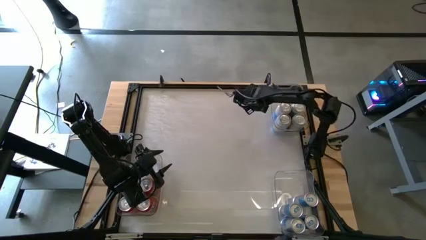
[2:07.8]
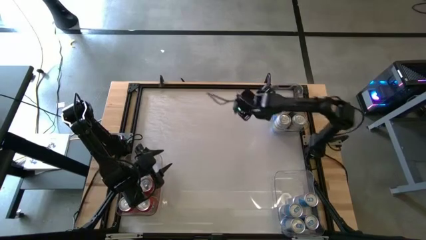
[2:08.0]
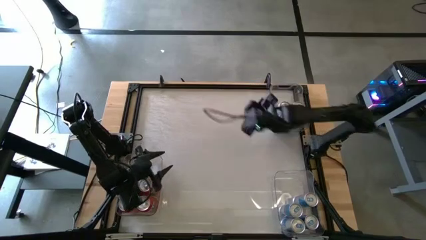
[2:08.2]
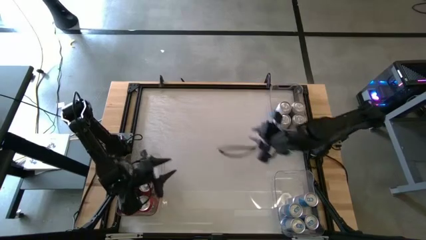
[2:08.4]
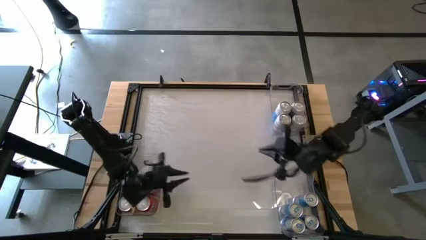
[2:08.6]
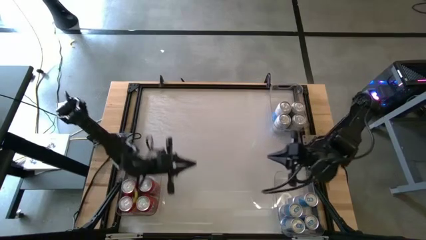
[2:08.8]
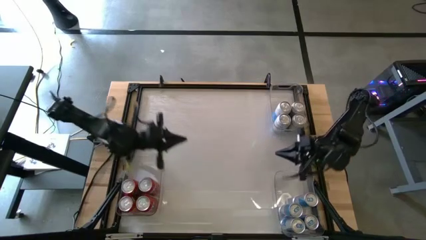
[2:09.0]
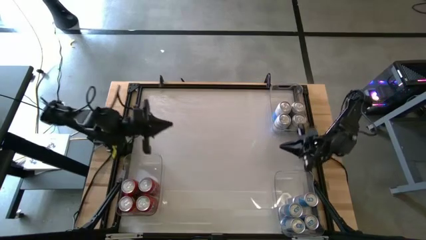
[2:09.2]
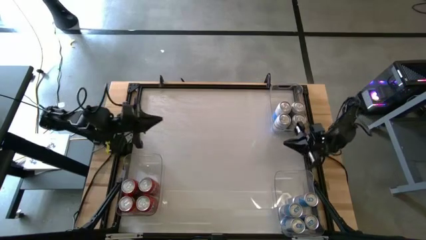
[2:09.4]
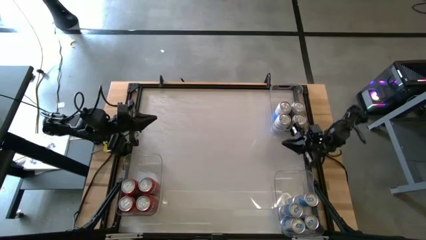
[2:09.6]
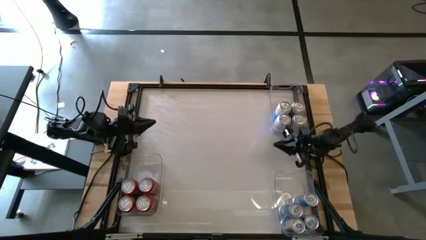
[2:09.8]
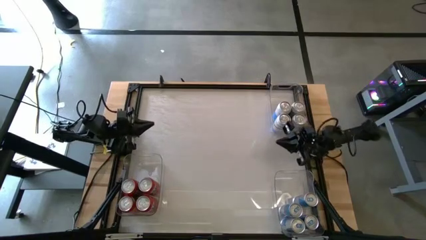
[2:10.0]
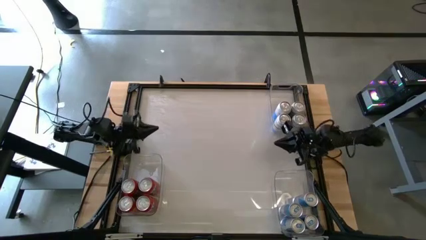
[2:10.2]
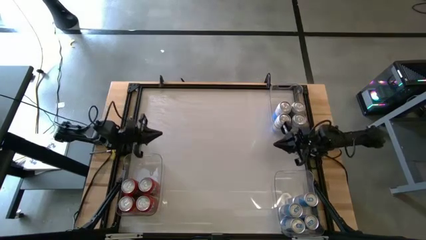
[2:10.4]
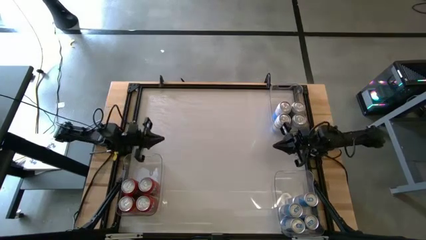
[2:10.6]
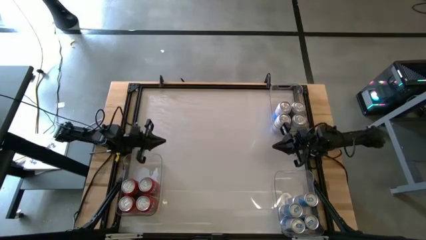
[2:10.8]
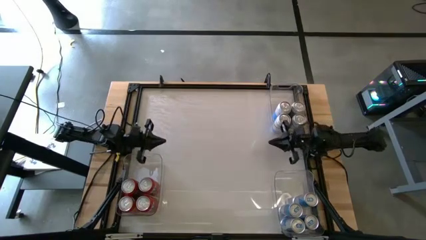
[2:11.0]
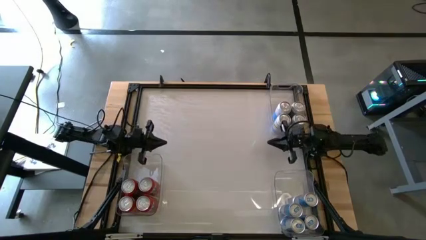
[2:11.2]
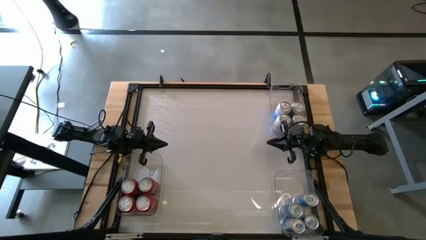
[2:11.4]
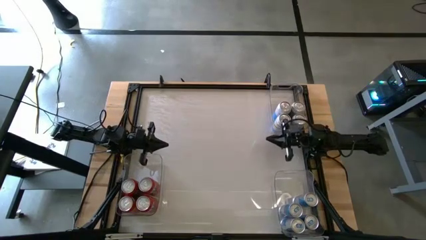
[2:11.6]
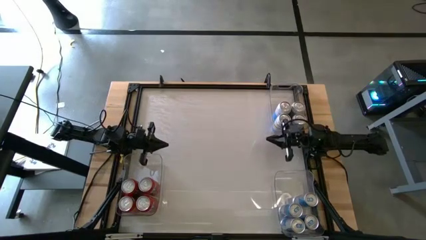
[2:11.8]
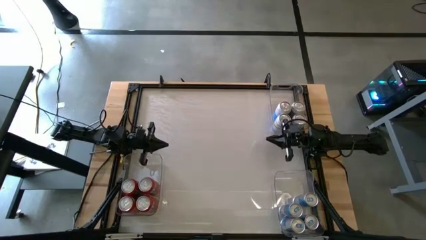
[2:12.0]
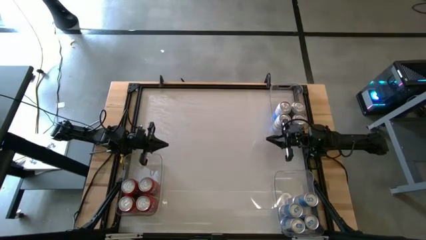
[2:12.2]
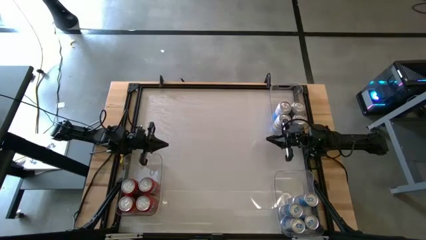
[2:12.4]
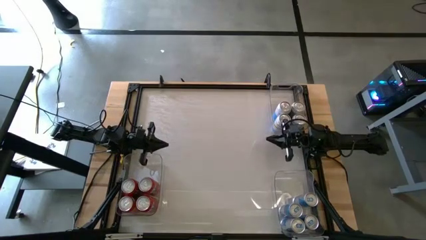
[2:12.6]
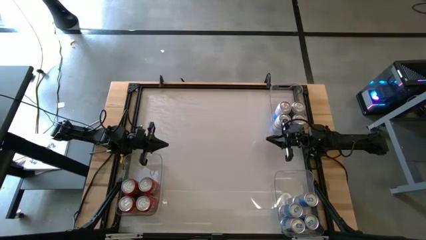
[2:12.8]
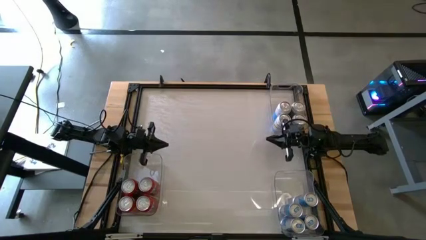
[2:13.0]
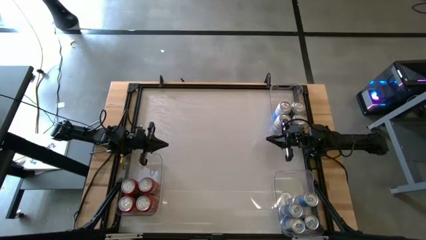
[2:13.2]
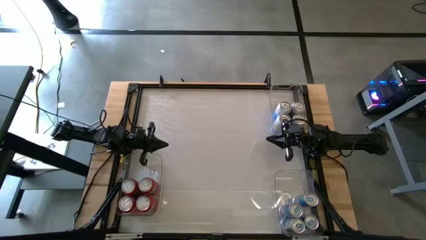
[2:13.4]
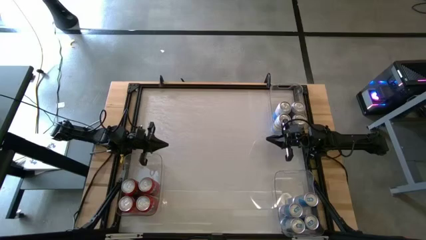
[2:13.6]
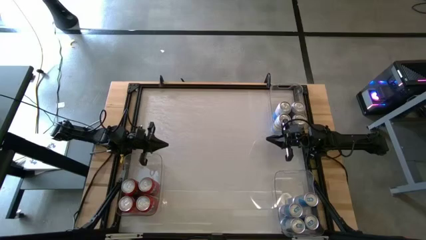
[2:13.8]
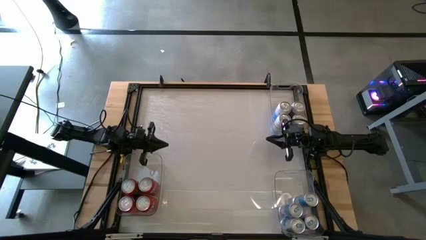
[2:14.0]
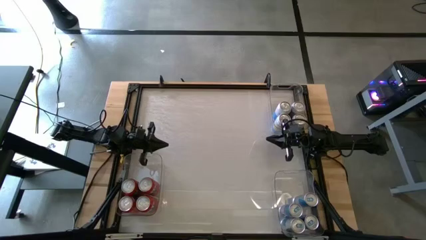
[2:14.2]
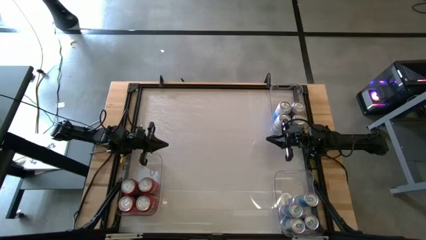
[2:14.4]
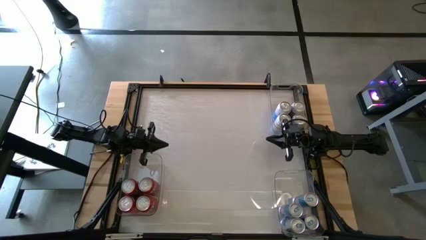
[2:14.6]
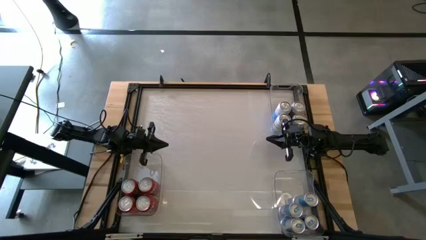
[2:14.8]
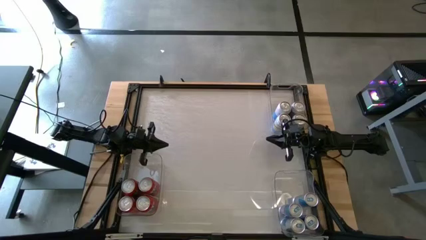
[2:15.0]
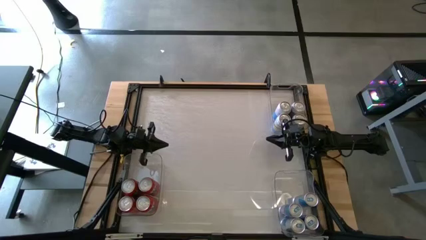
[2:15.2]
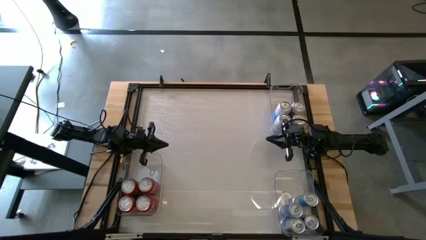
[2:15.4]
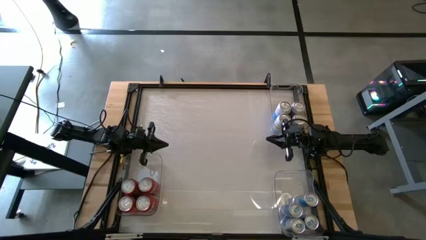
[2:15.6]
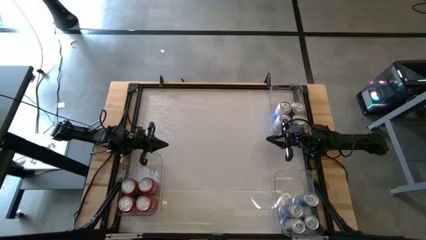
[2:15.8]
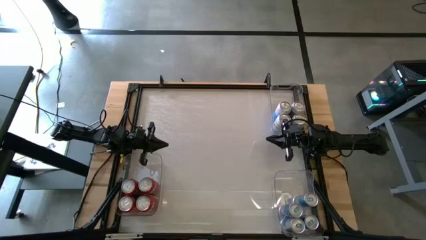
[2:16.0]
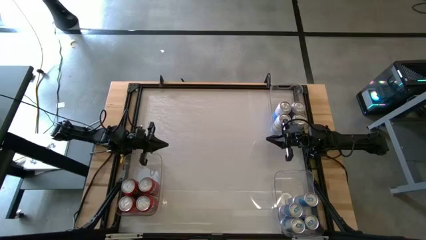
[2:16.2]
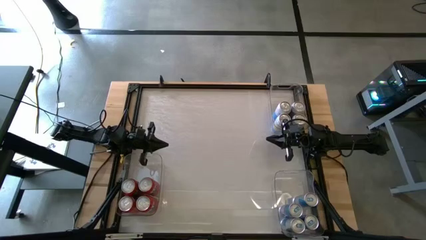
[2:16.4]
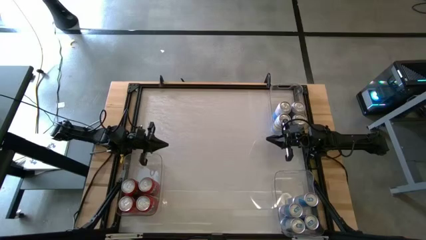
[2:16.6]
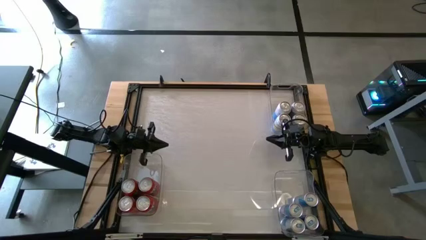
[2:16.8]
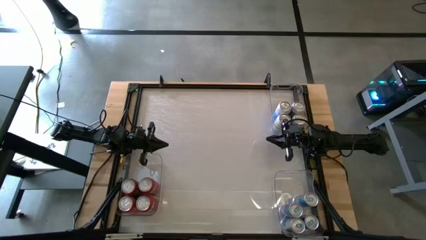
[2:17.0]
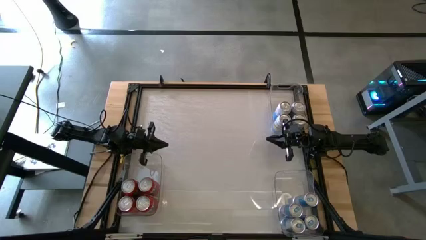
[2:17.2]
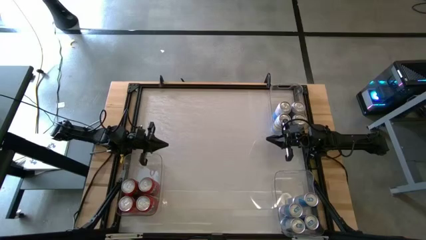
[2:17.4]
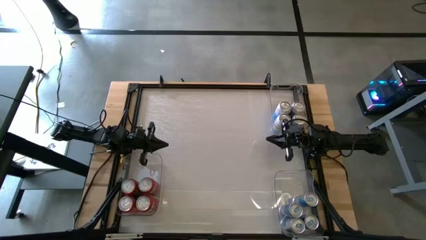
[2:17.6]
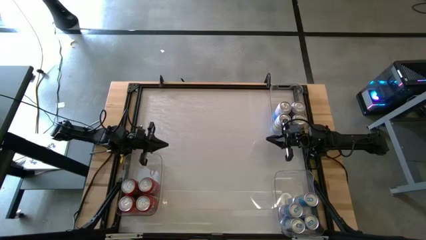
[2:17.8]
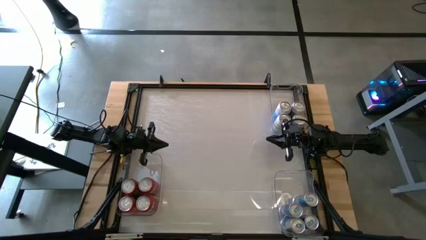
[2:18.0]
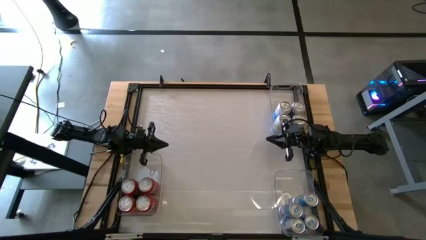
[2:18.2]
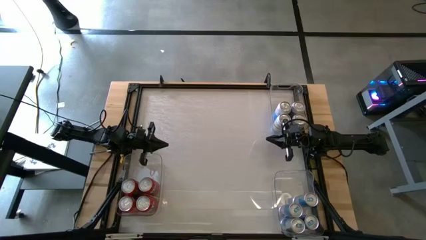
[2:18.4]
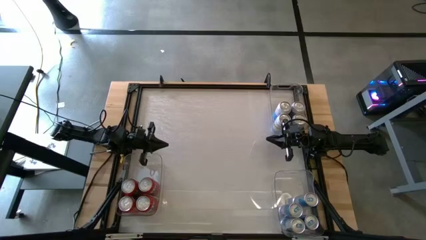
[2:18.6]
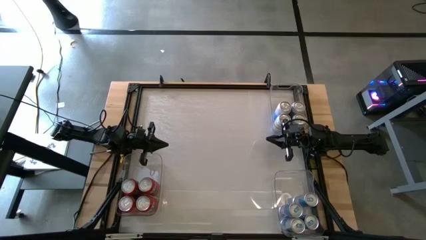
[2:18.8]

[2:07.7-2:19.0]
Task: Sort soda cans
Return to Home Position

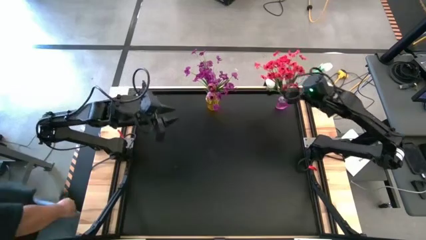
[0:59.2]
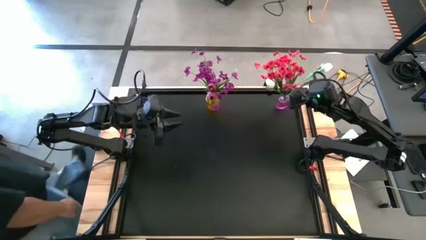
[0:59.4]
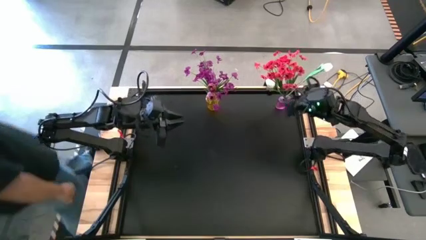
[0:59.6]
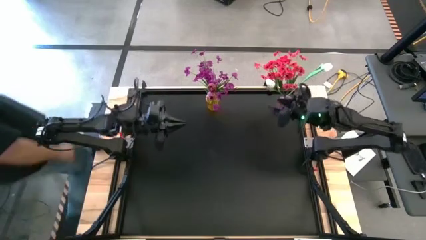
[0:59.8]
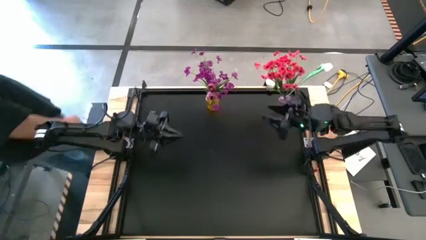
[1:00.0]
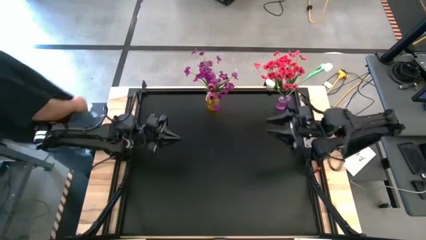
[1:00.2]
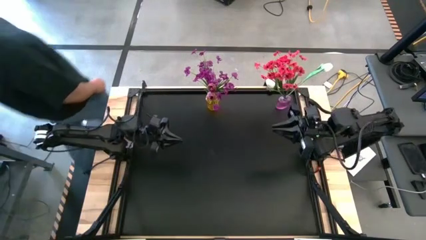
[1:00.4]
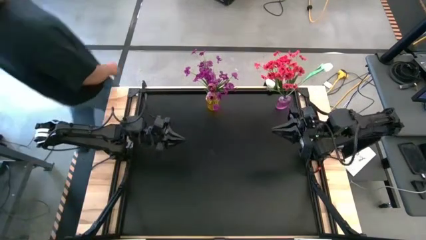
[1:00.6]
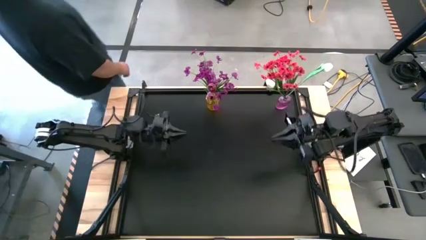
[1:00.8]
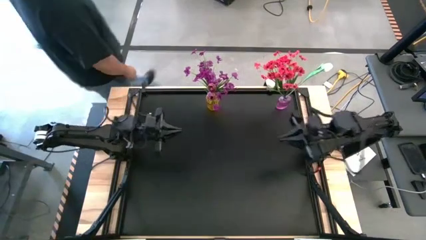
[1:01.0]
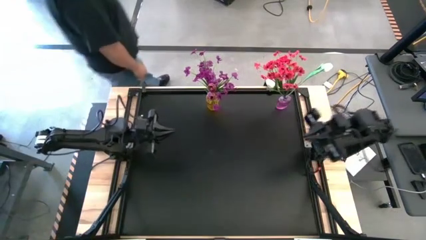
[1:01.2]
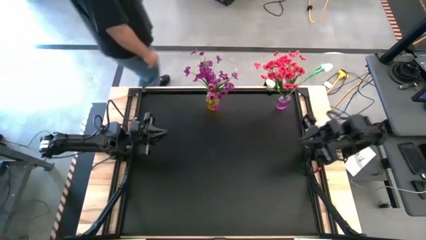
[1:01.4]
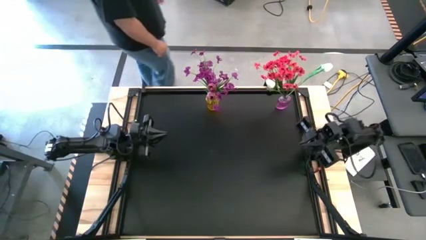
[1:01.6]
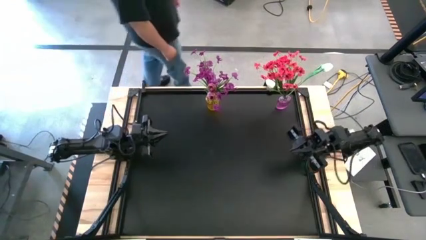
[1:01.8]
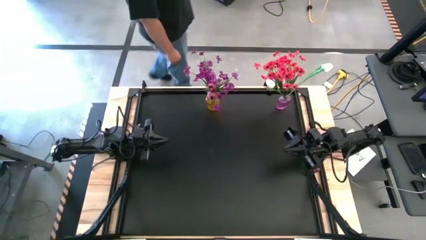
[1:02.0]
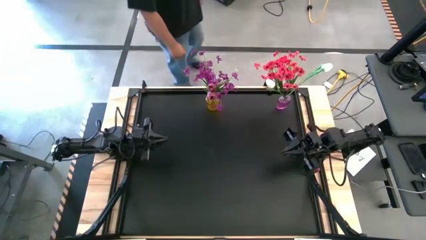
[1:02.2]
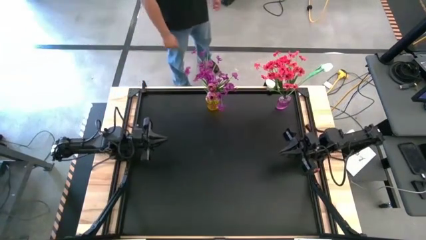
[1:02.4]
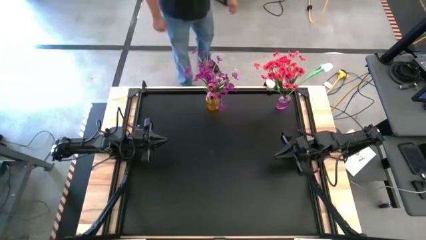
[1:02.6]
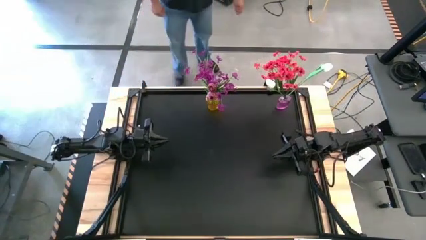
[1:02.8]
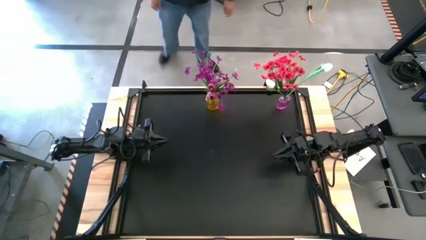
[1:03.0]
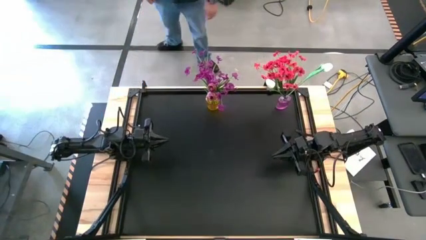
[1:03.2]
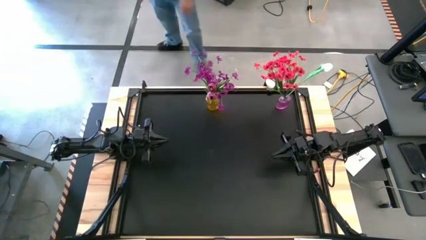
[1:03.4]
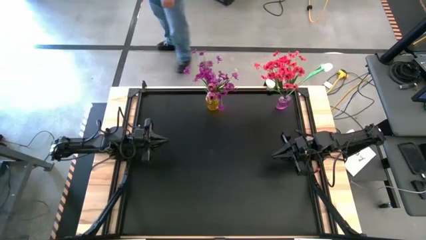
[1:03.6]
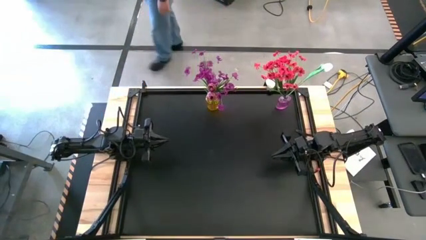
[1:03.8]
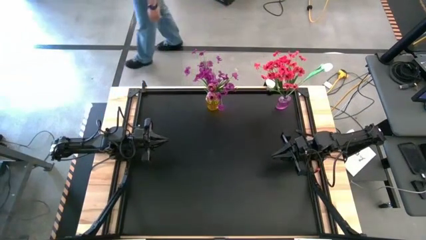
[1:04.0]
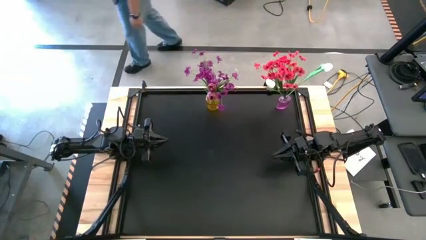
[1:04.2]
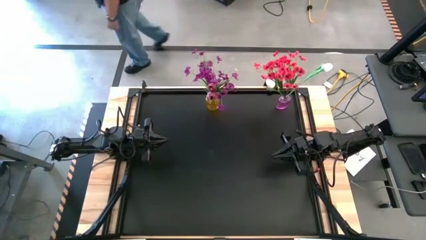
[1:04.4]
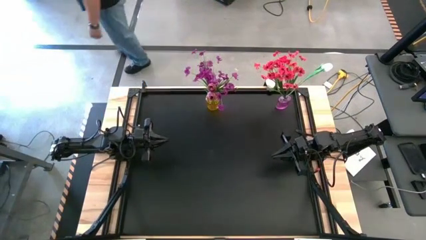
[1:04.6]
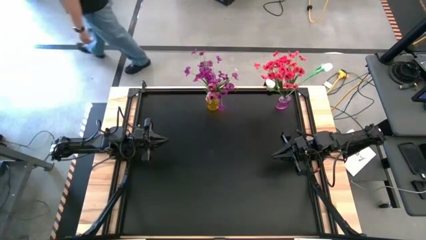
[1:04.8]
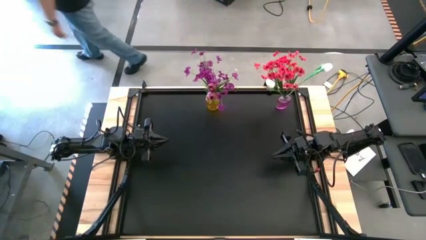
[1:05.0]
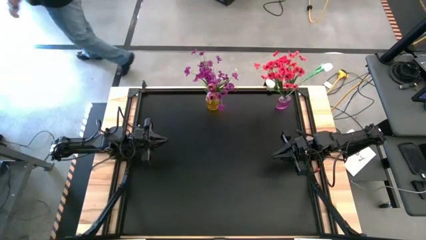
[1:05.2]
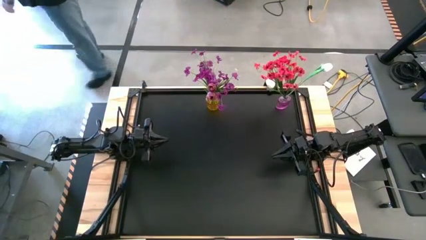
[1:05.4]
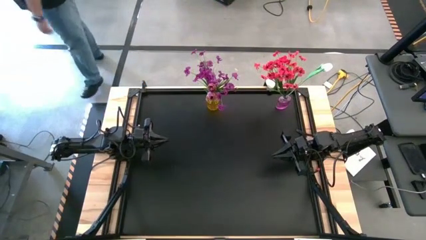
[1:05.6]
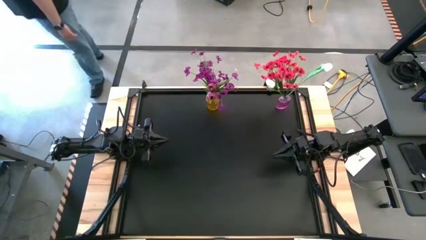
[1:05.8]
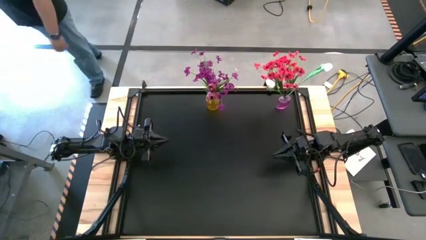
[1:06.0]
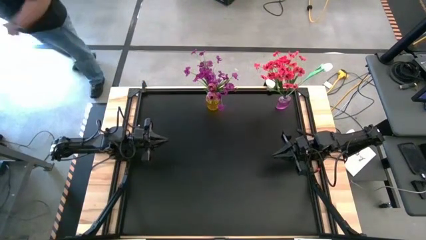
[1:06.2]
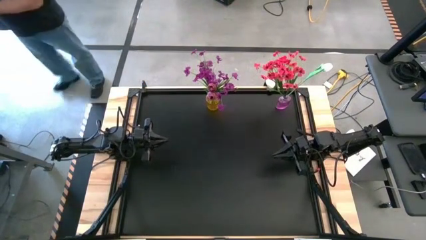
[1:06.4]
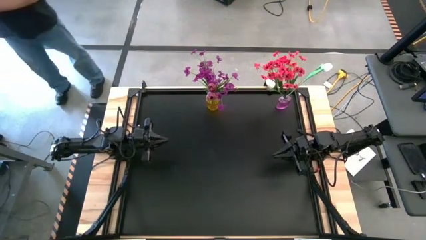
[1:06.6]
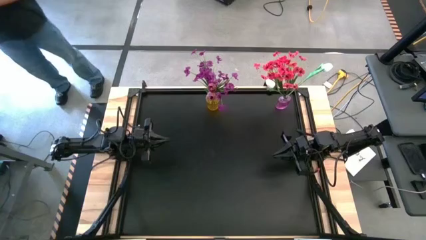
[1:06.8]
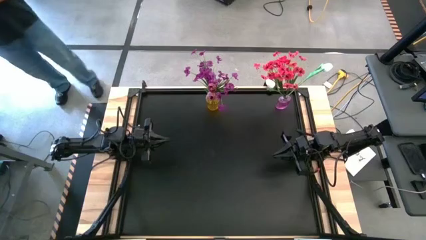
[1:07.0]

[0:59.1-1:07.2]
Task: Sort flowers into vase by color
Return to Home Position
